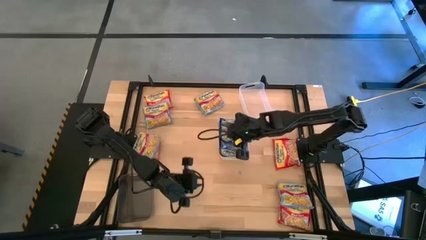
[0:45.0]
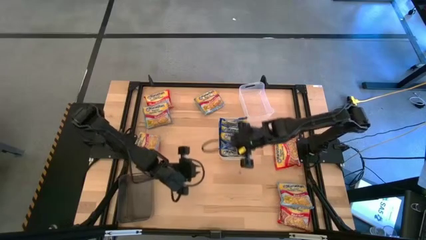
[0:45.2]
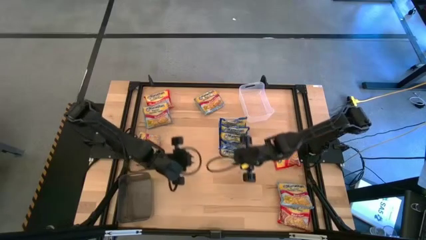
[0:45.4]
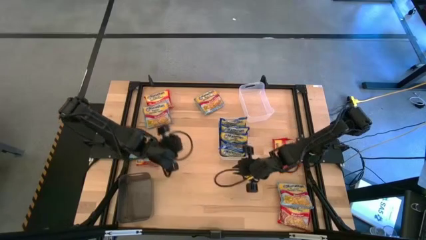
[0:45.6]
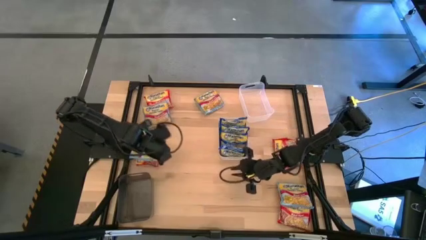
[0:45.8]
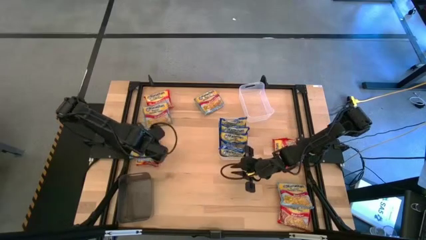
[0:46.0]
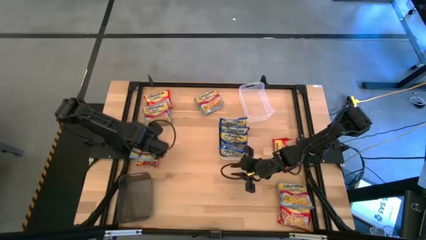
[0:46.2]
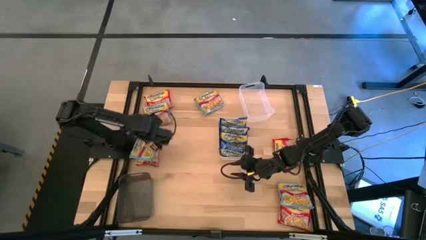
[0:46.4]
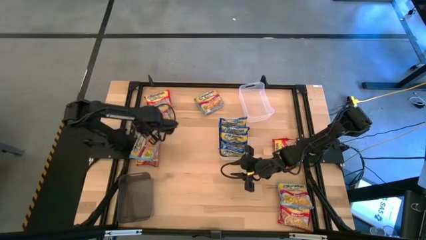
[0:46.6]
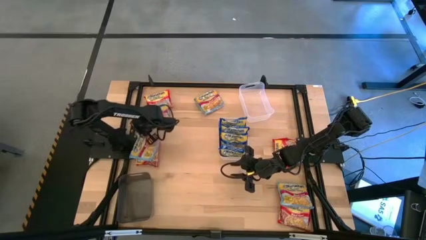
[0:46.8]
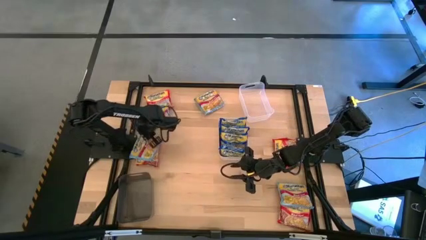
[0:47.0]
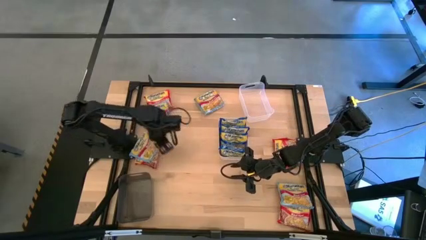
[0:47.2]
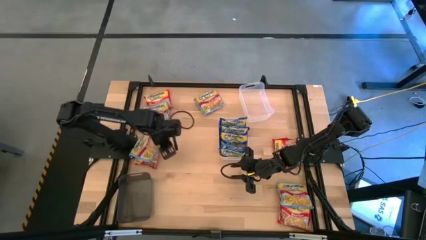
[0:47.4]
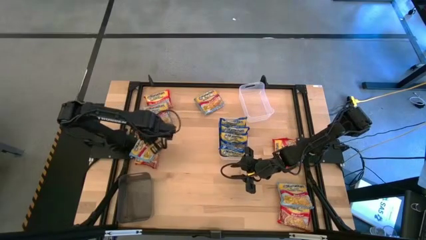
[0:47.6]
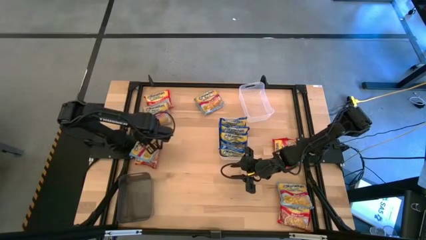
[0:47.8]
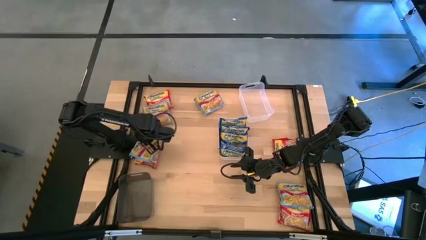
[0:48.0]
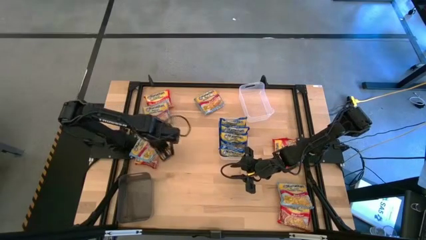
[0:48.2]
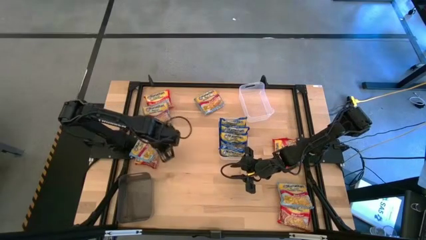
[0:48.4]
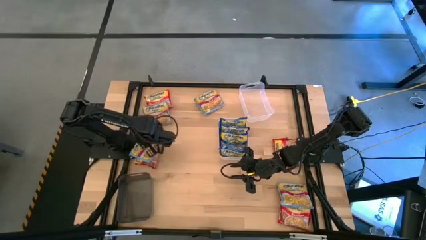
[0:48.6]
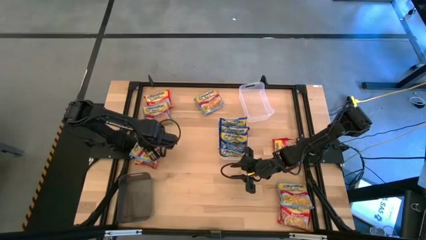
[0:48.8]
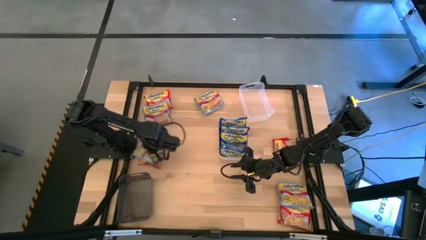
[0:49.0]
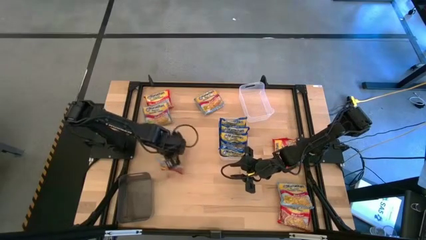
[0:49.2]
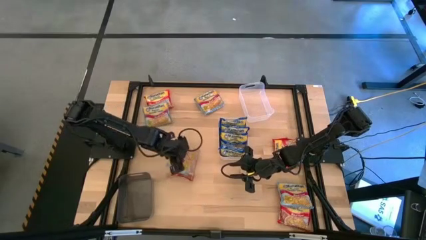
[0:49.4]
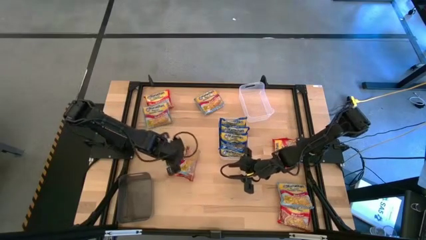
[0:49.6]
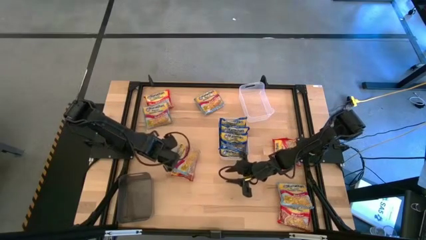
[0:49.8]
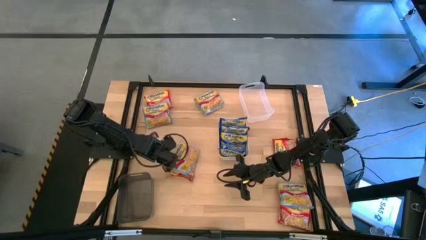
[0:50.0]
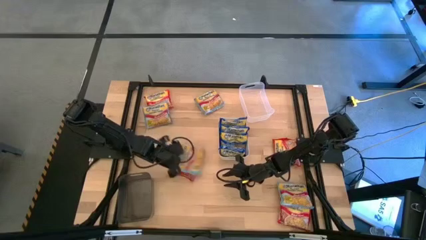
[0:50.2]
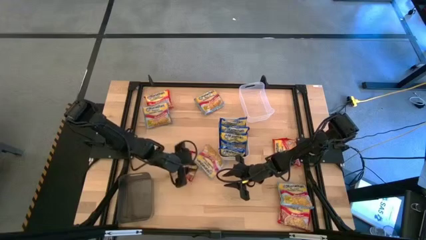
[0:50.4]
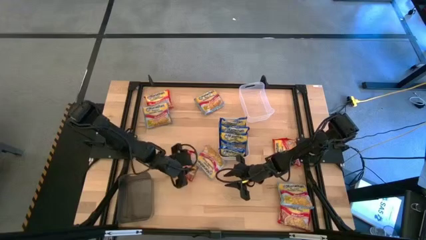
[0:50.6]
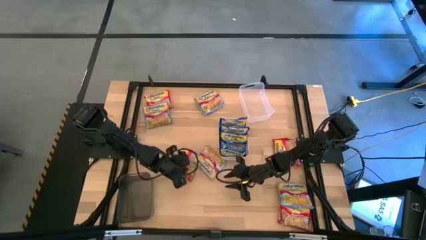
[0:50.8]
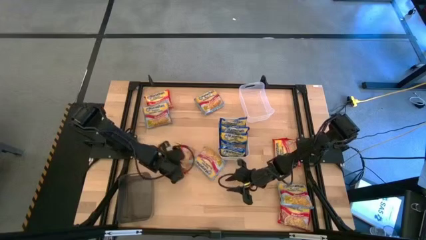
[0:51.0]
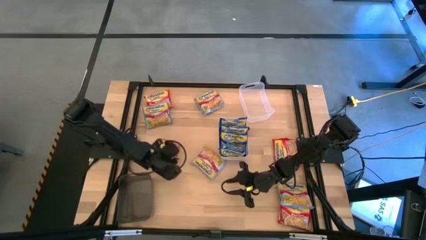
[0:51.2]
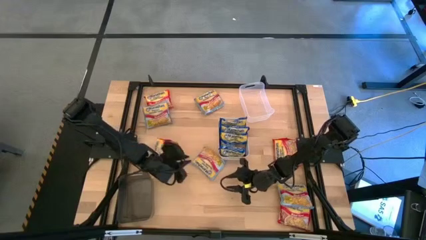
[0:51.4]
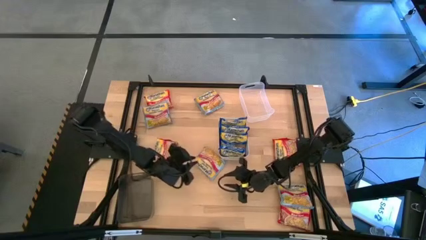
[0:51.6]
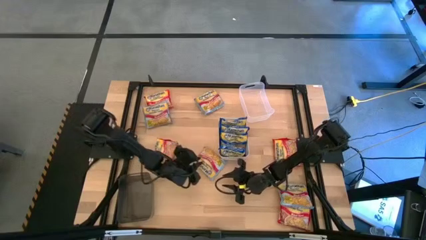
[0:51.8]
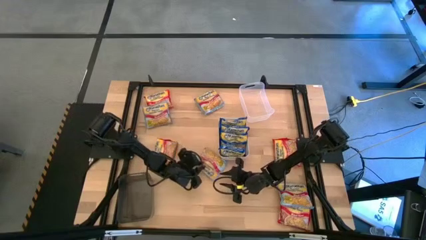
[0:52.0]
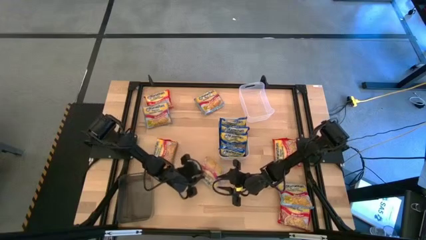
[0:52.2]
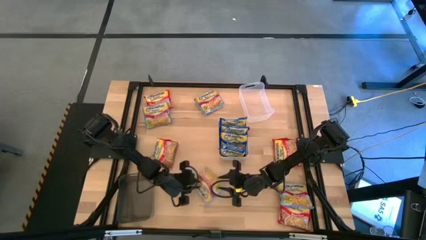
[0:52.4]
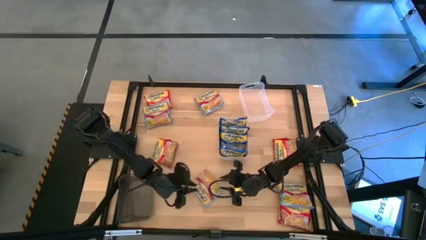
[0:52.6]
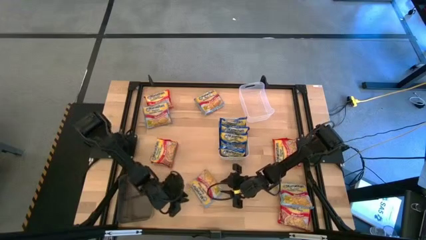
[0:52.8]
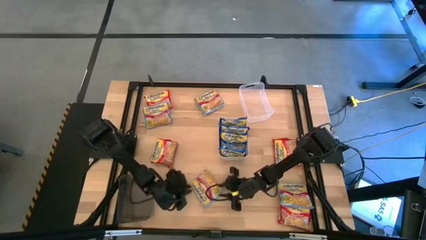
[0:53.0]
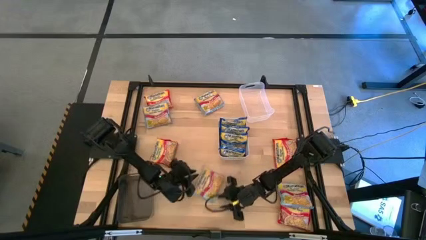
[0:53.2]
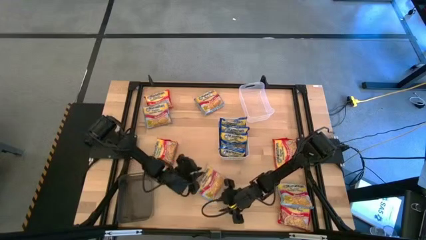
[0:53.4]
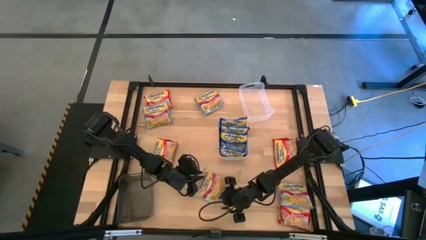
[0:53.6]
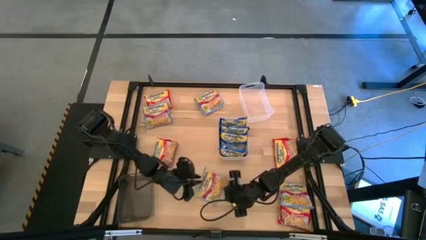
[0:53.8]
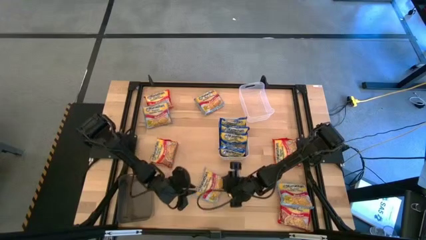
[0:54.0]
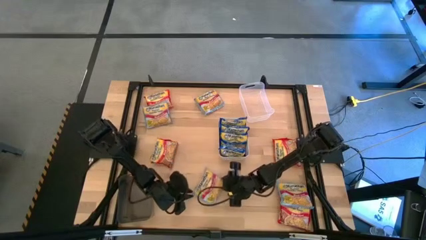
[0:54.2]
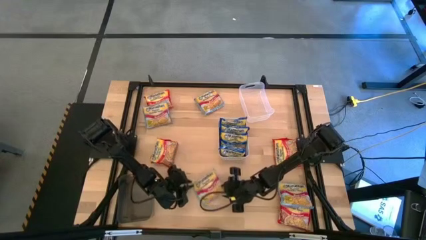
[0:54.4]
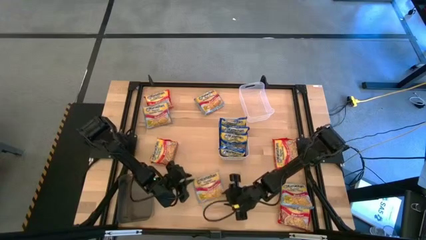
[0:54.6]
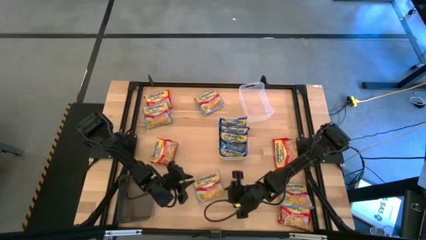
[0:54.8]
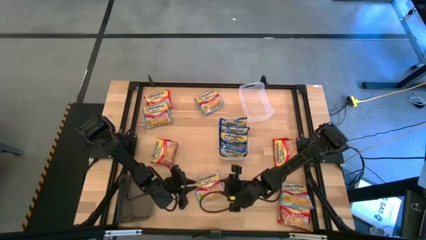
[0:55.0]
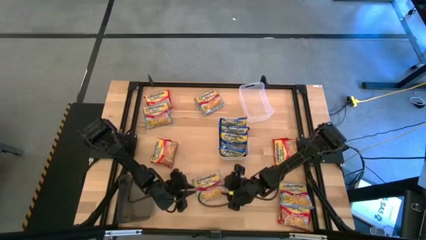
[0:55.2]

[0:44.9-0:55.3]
Task: Sort Maruchan noodles
Put the light blue noodle pack in the transparent bin
